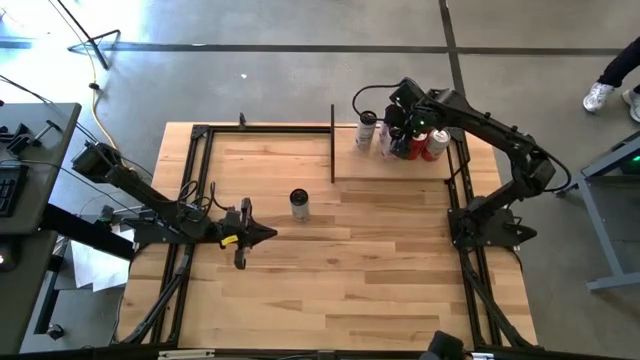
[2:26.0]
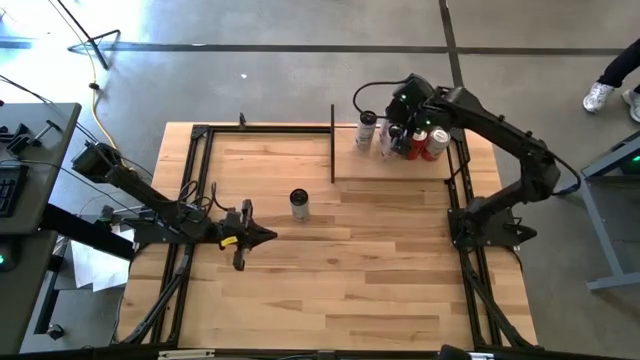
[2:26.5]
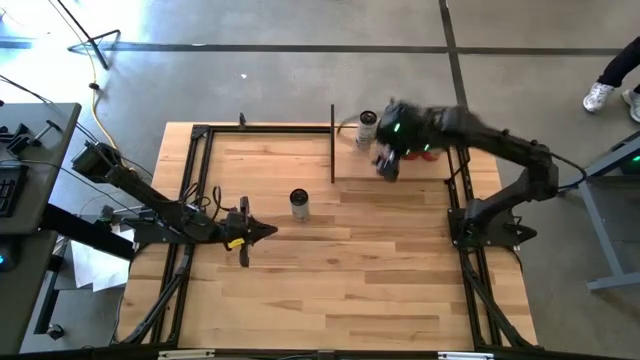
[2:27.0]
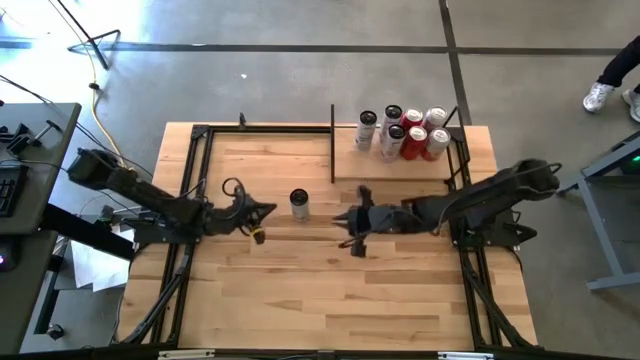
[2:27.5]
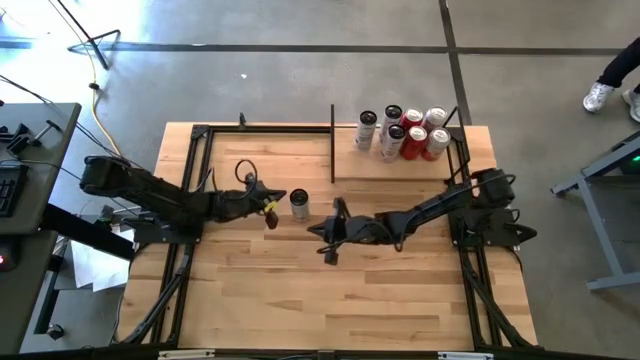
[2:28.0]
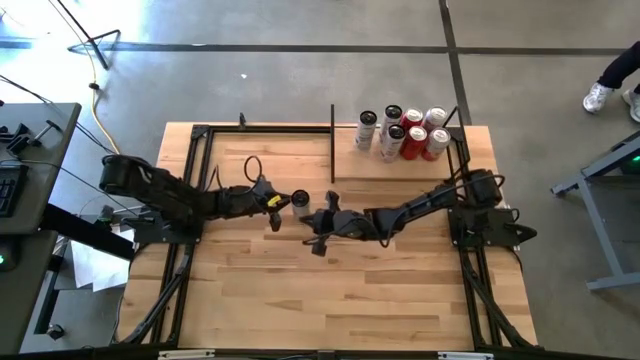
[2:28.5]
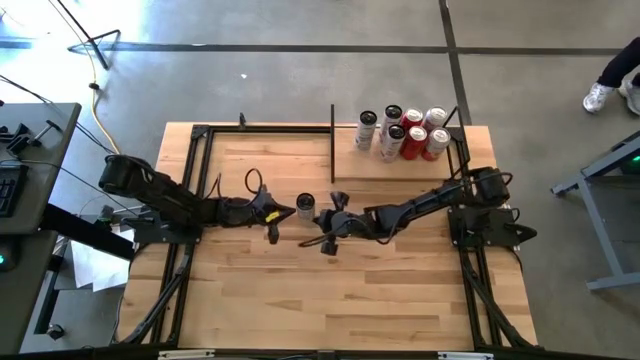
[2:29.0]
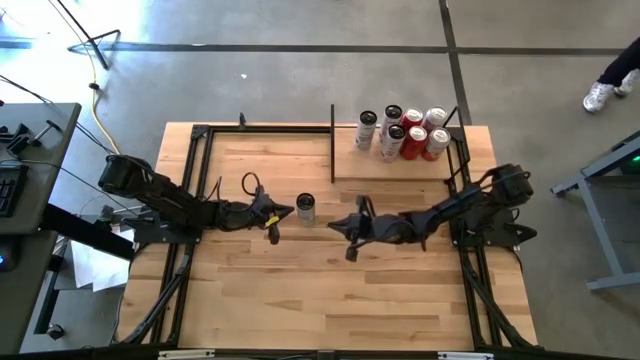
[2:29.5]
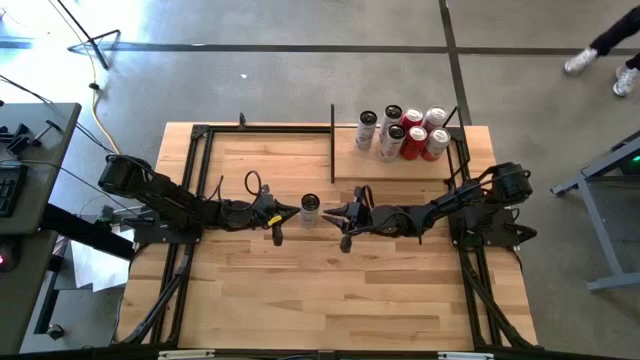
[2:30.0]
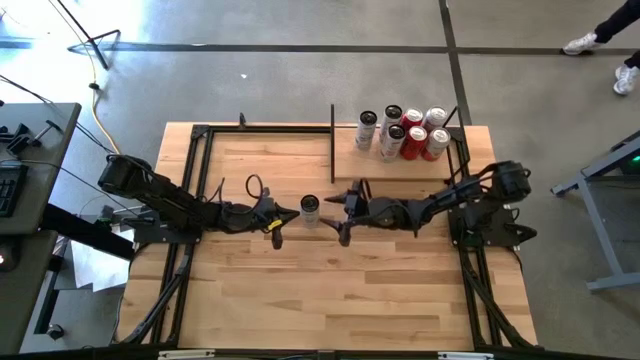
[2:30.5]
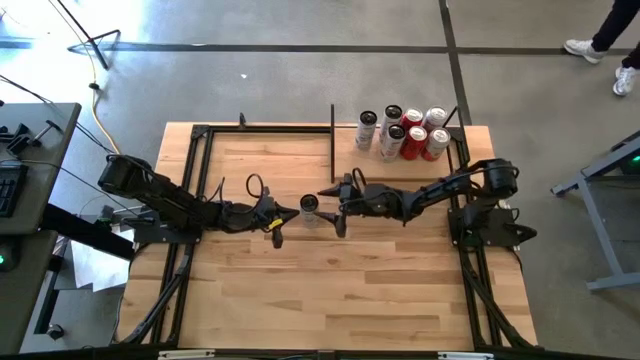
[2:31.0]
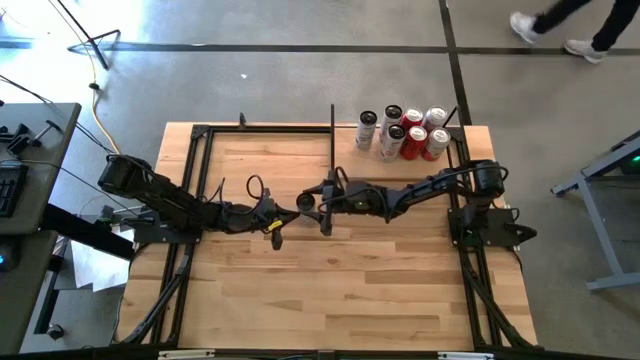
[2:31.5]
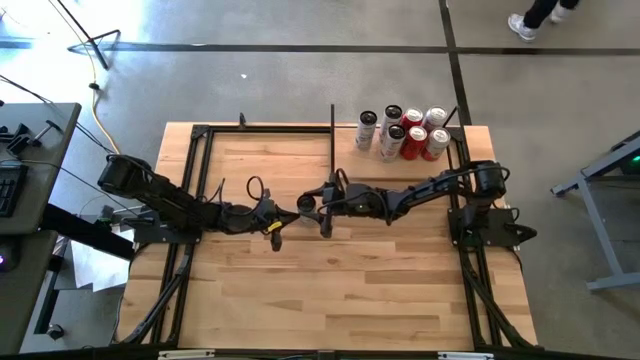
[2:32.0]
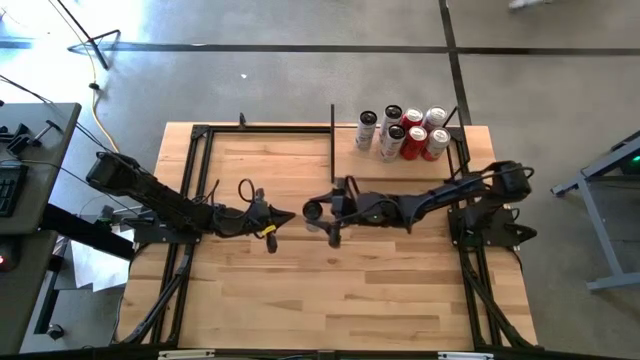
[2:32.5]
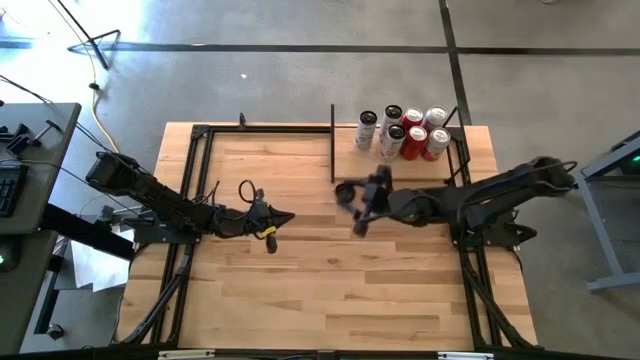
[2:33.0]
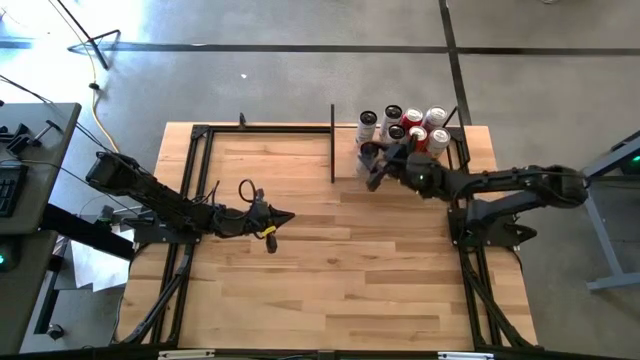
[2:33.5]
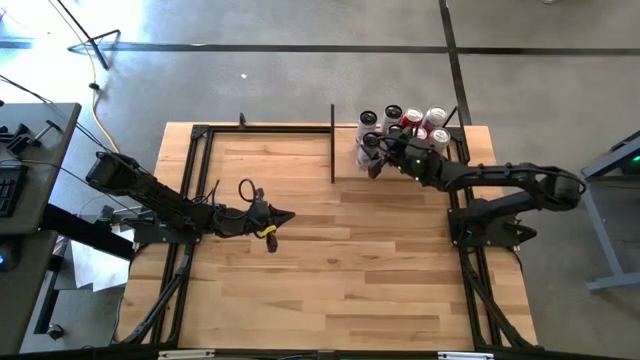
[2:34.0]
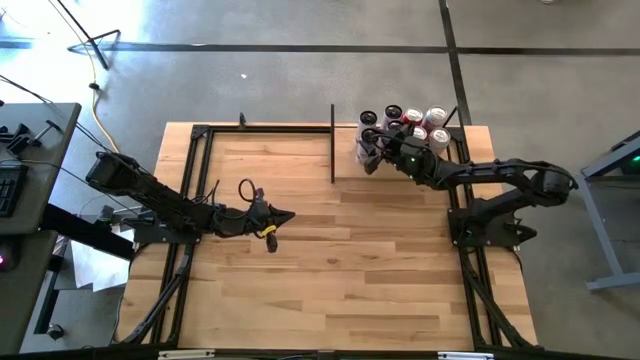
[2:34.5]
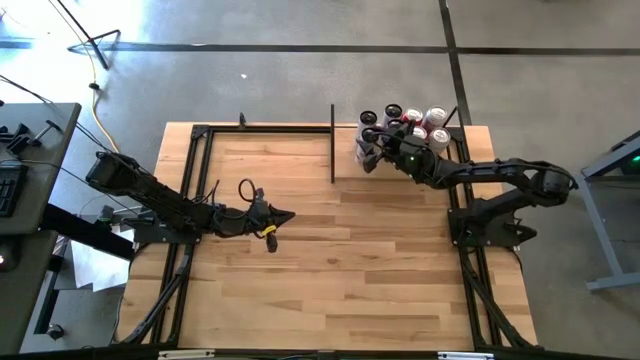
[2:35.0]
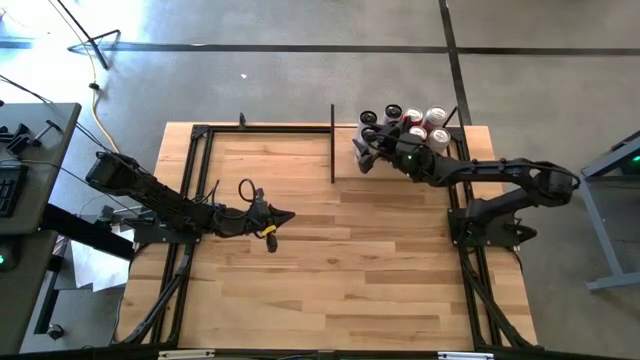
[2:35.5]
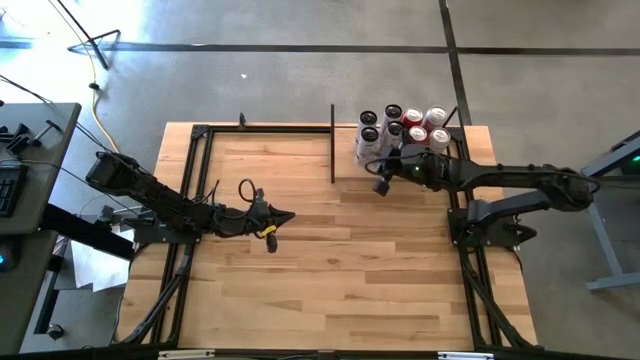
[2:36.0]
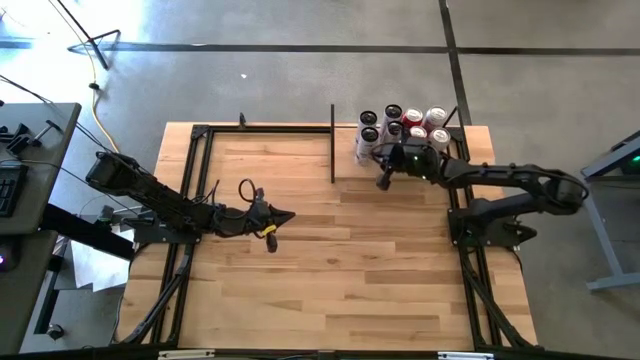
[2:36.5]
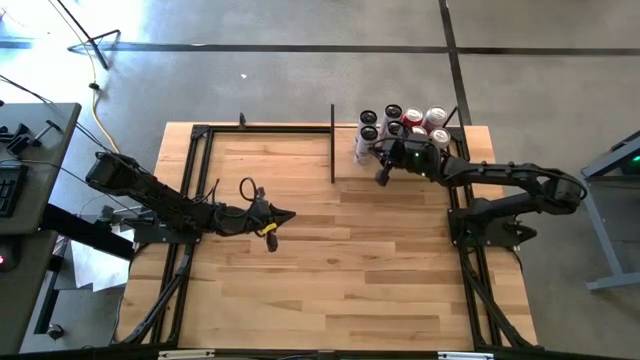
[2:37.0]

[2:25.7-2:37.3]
Task: Place canned beverage on shelf
Put the arctic vibe soda can on the shelf aligned with the other arctic soda can

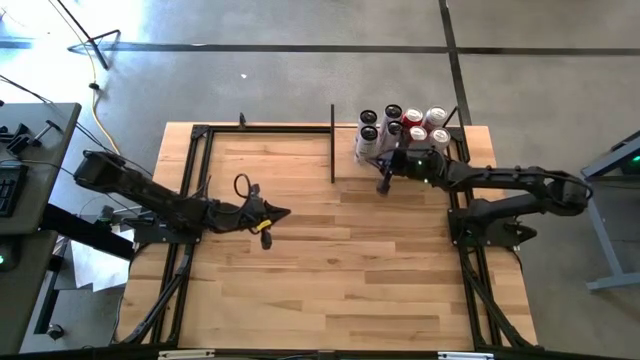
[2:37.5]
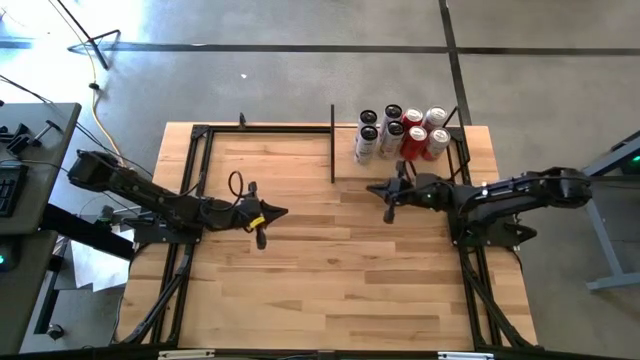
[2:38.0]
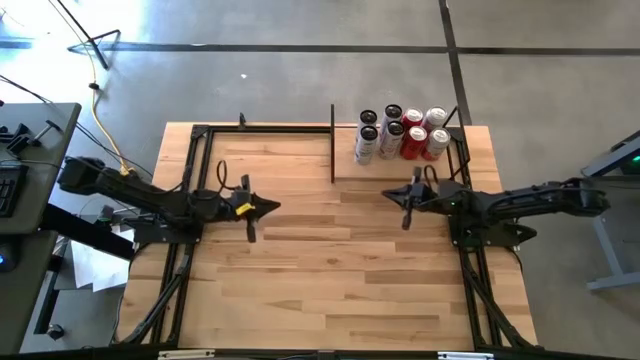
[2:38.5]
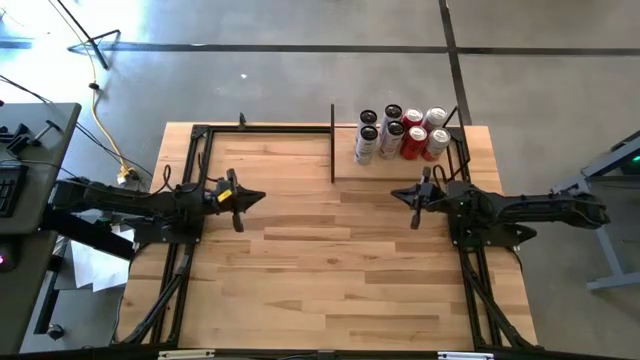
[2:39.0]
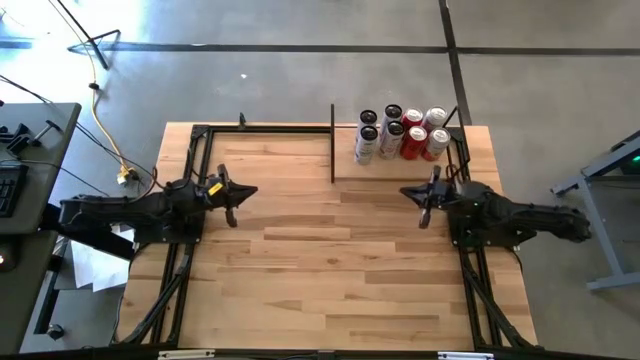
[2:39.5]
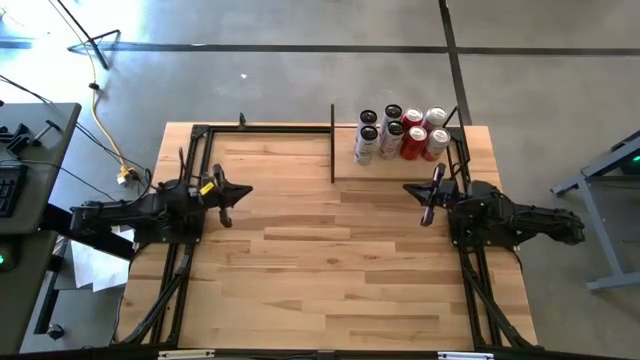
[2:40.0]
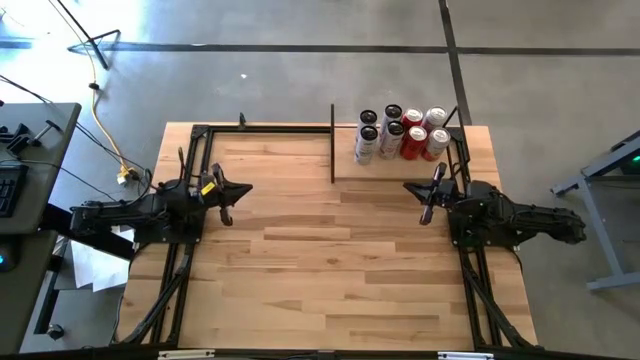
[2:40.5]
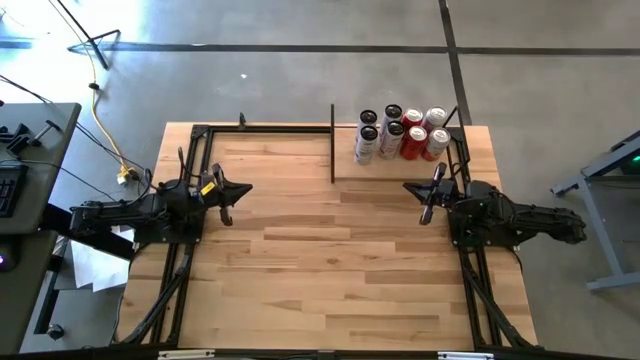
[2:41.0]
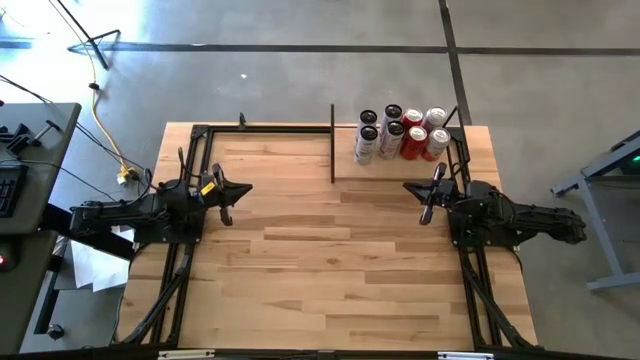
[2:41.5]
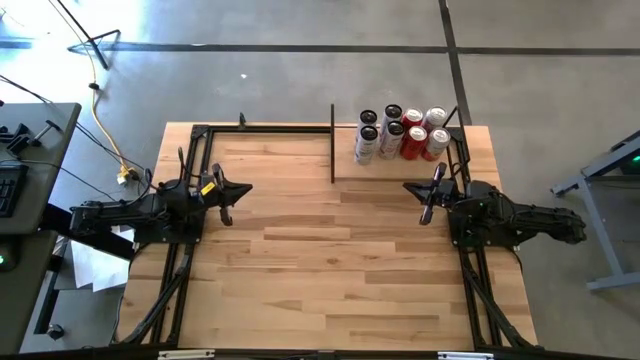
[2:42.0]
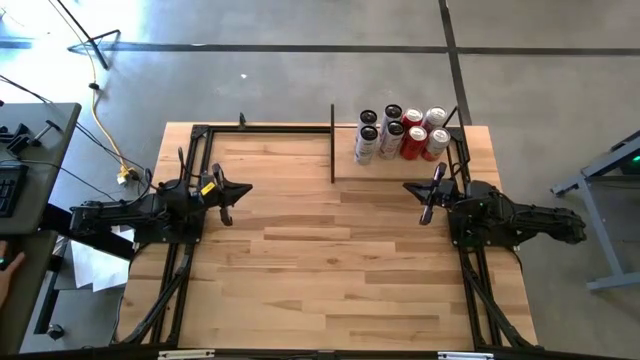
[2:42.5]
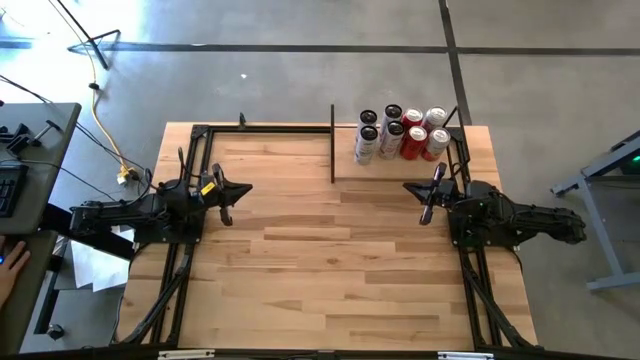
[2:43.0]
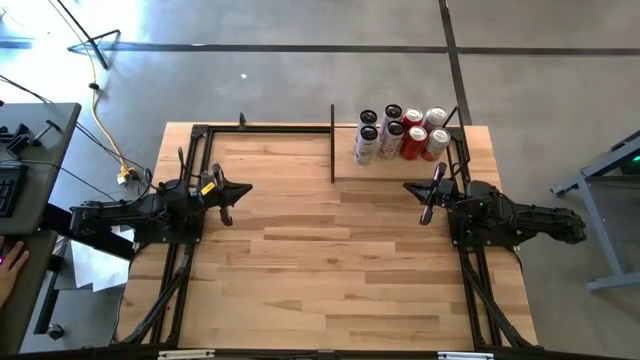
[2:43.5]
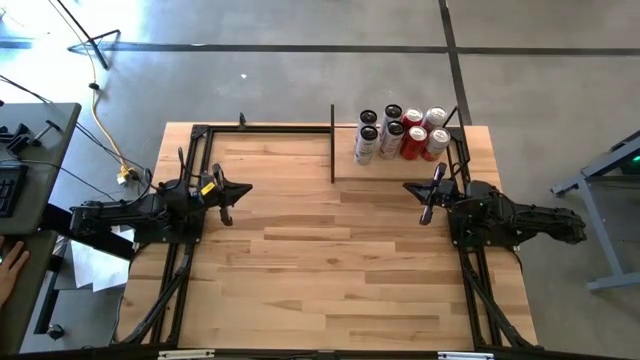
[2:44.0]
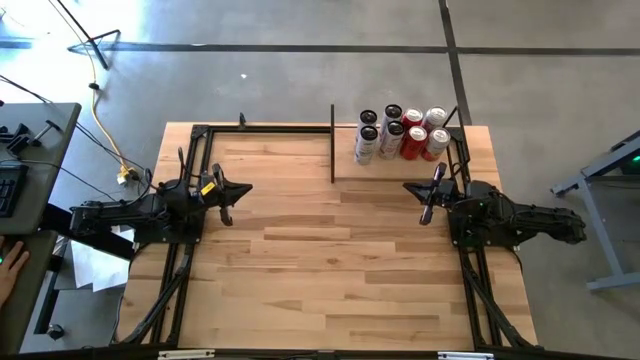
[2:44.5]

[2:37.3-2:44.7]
Return to Home Position

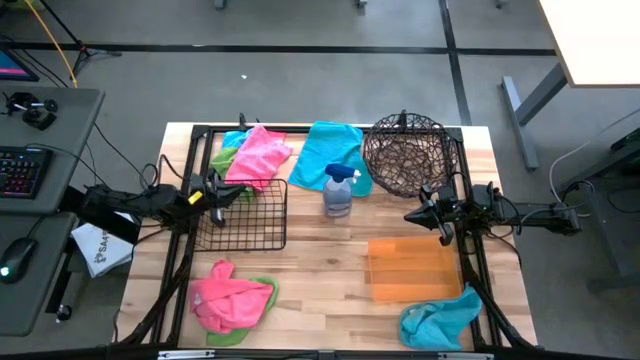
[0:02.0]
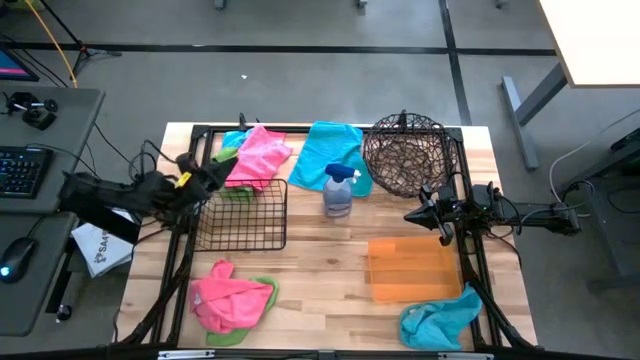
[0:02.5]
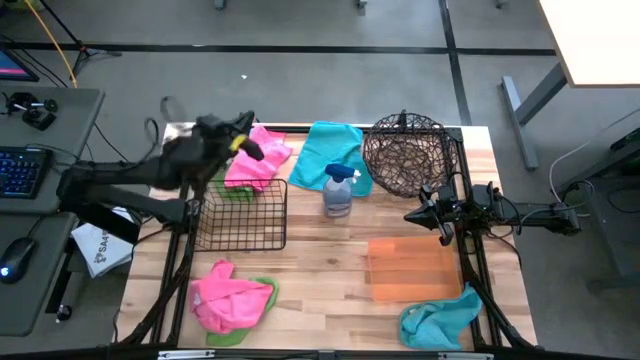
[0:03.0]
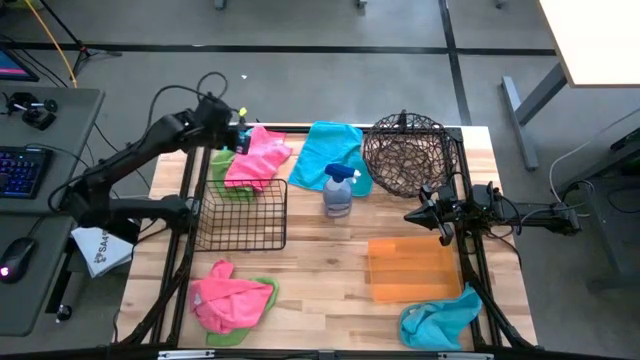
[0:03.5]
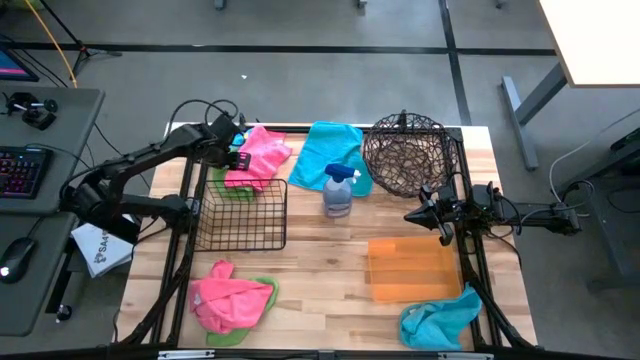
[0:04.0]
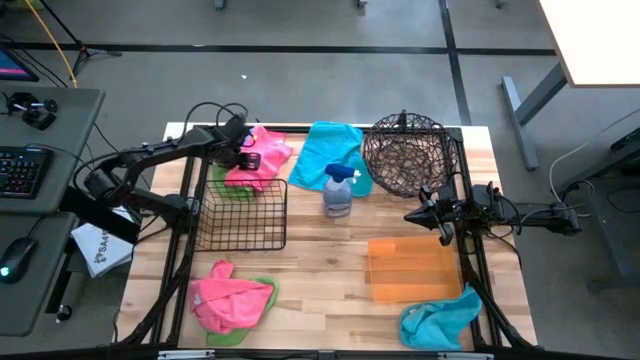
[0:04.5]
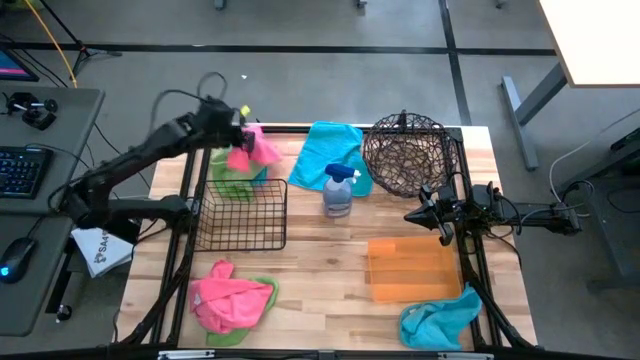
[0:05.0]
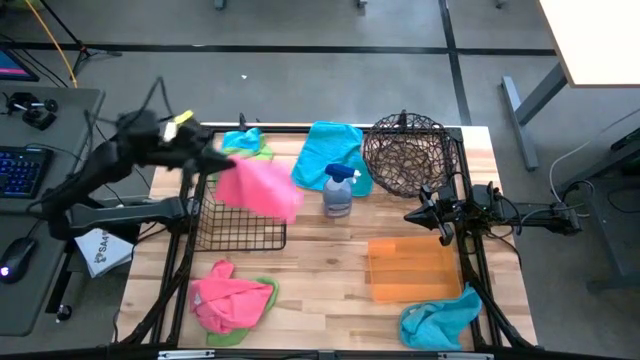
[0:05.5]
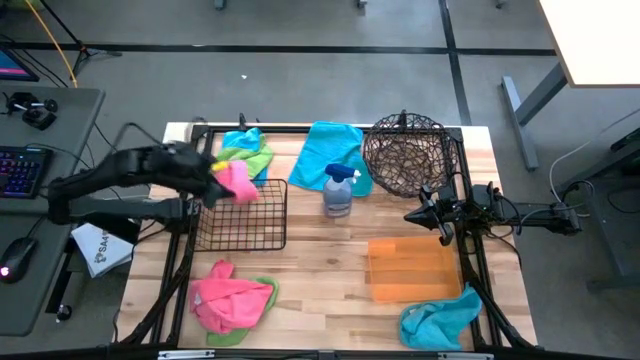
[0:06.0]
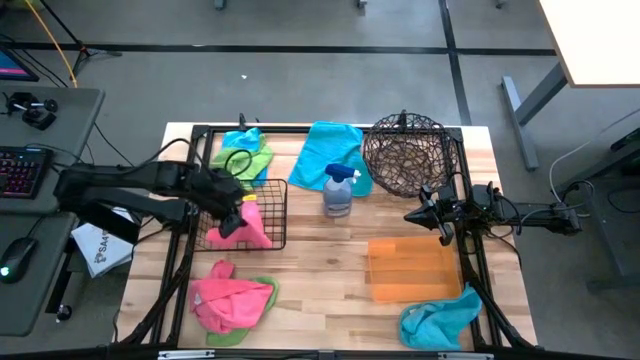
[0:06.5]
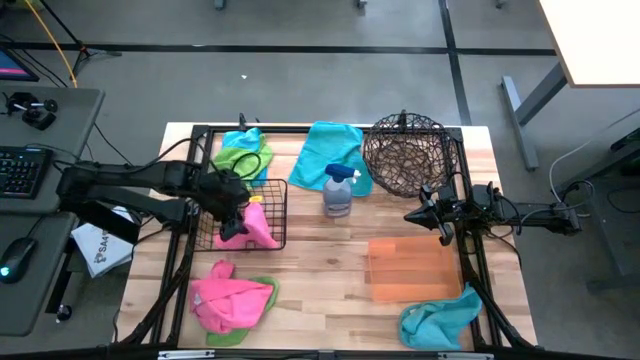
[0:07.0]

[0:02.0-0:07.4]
Task: Sort microfiber towel by color & place in baskets
Put the top pink microfiber cloth into the left wire basket
